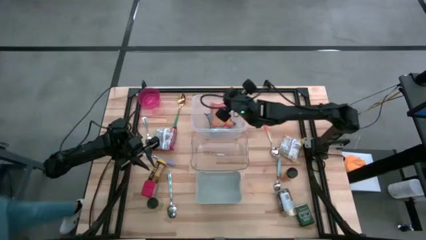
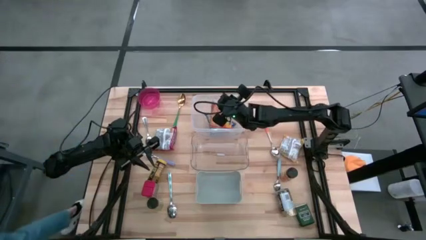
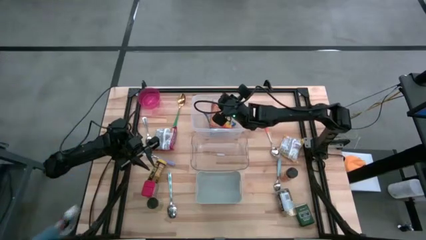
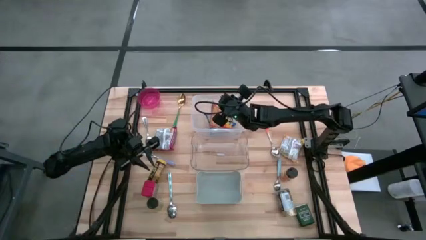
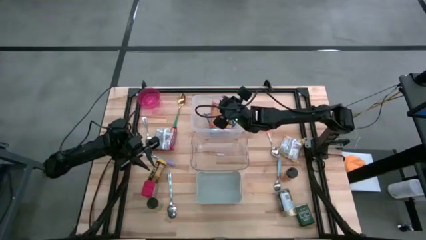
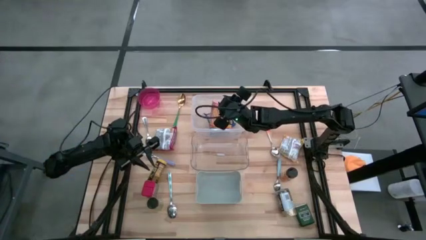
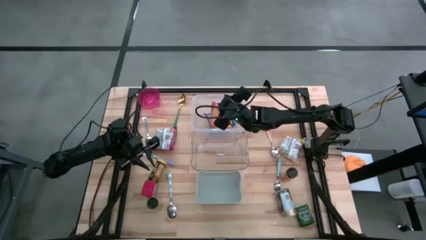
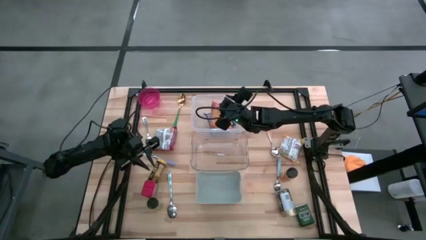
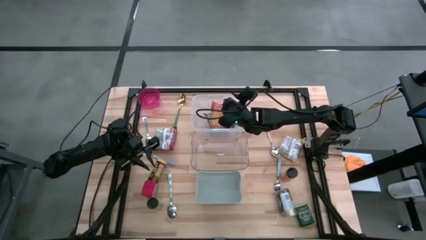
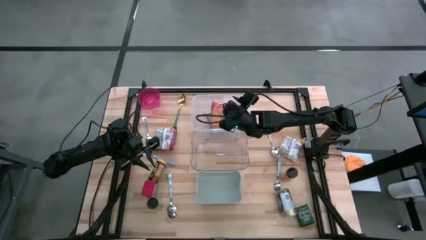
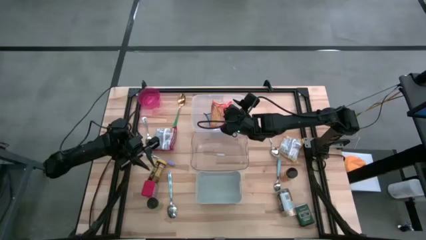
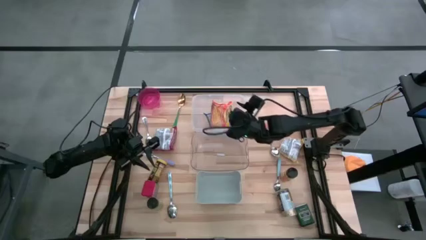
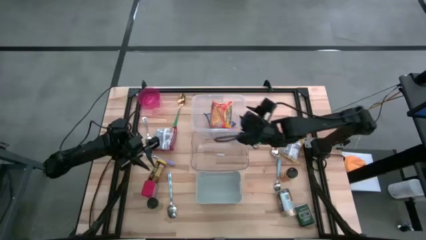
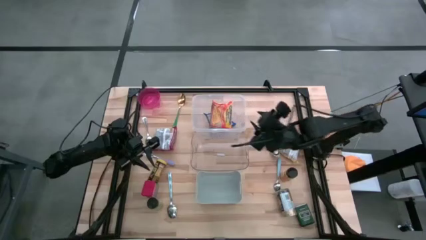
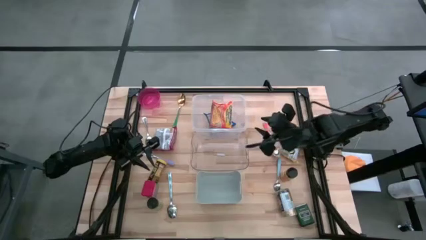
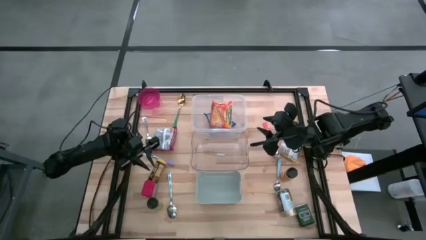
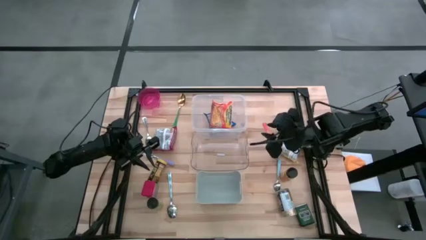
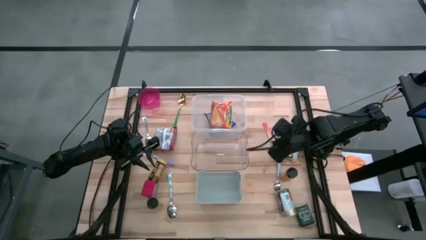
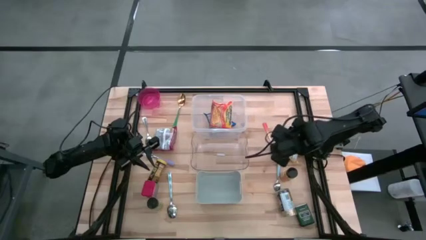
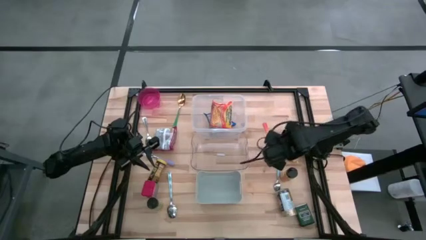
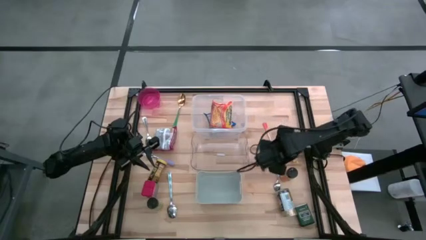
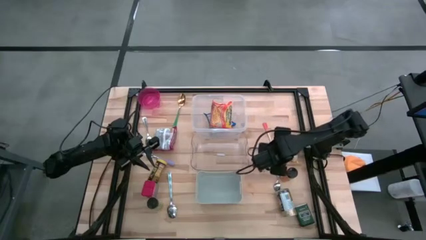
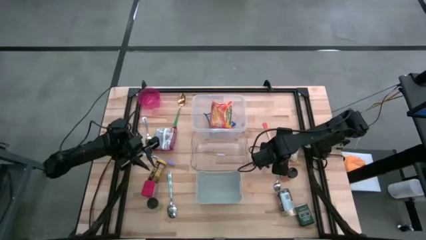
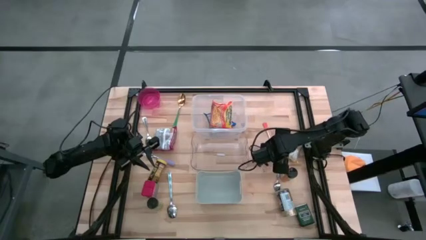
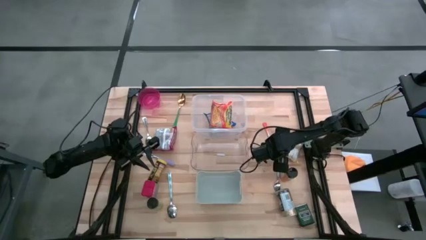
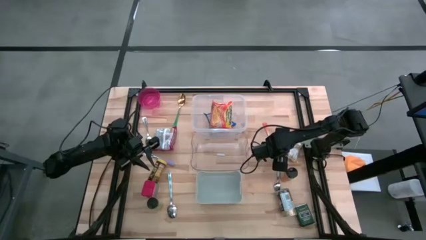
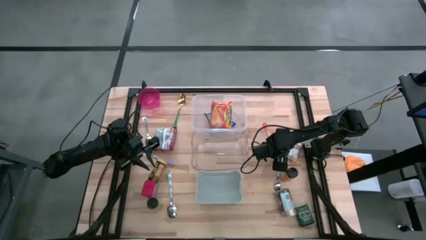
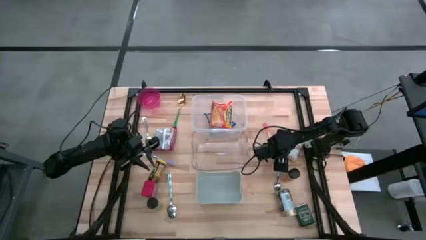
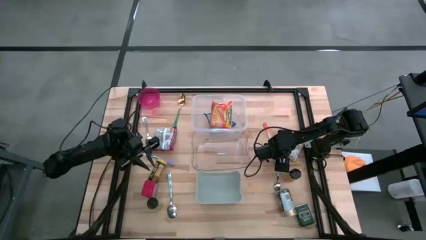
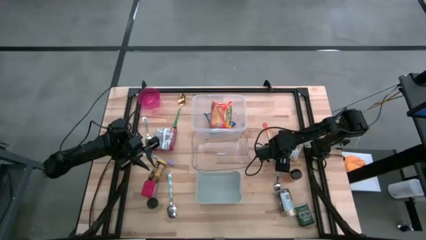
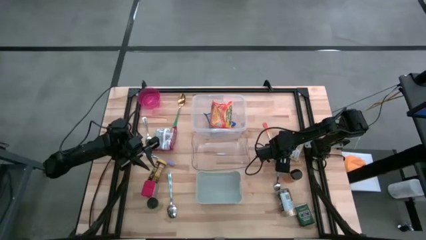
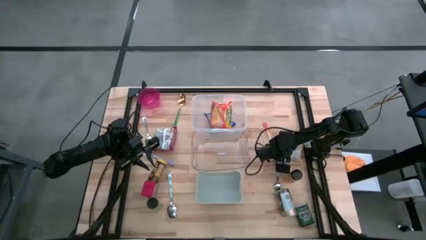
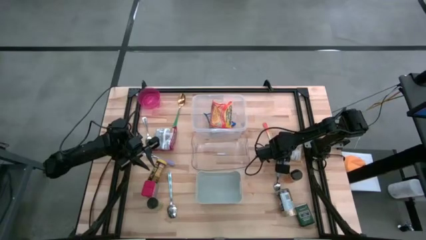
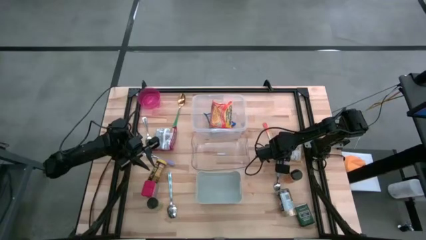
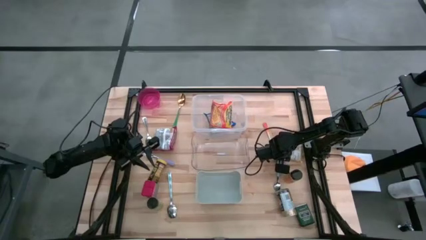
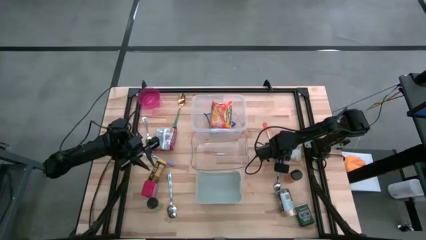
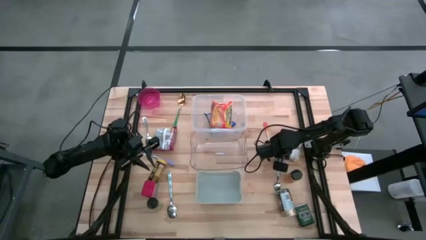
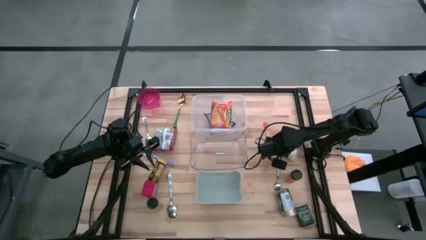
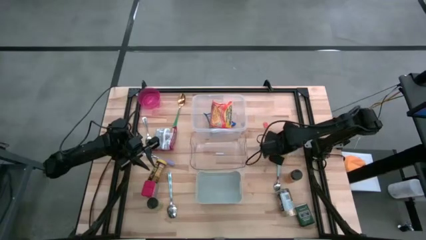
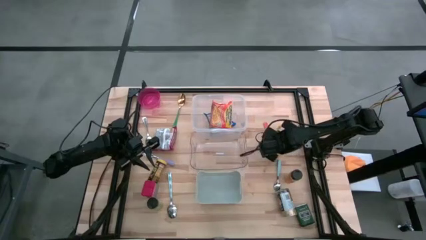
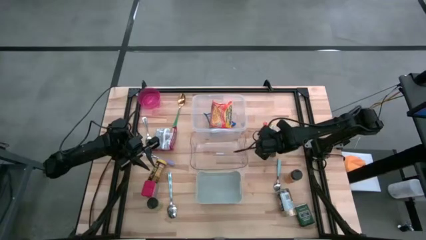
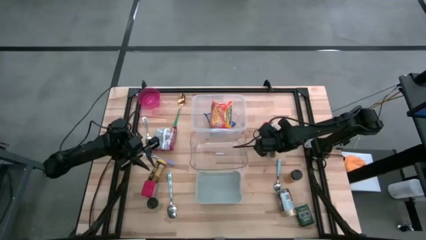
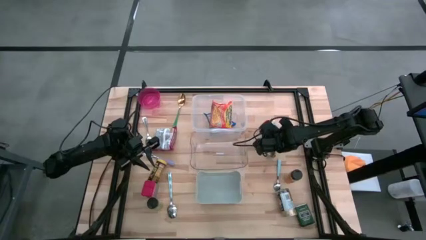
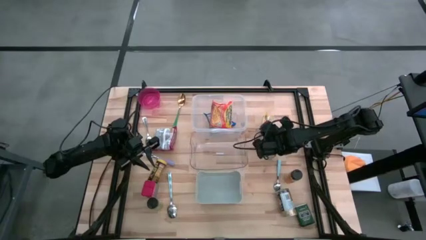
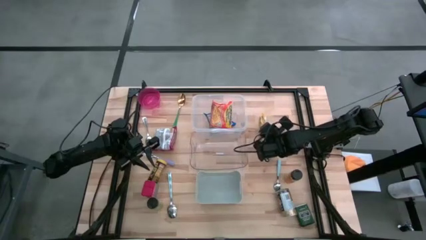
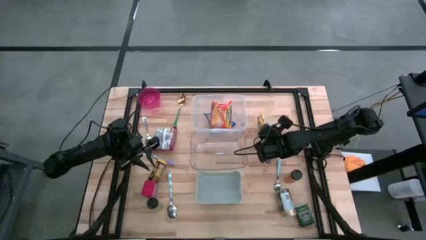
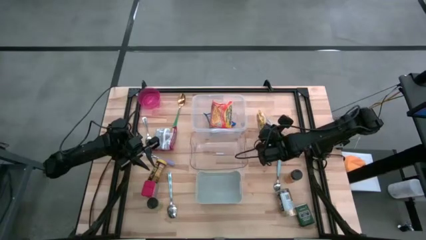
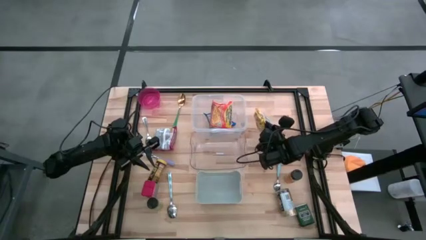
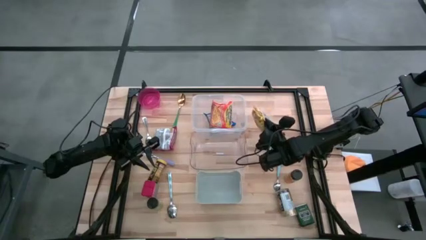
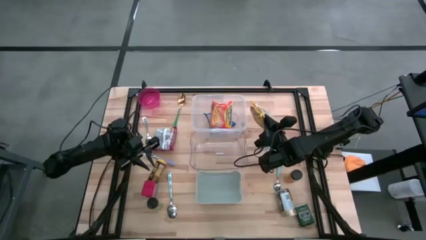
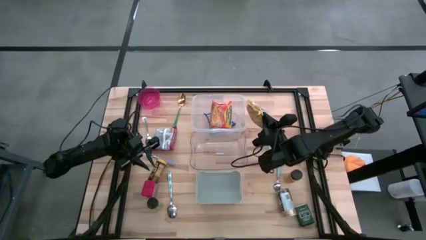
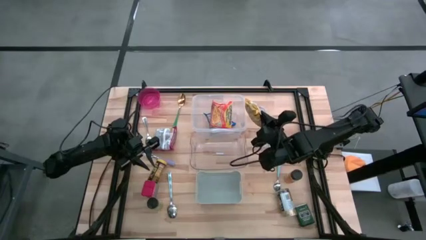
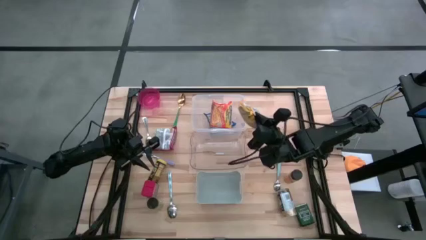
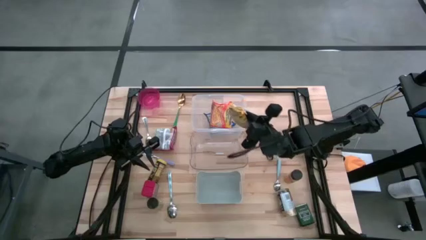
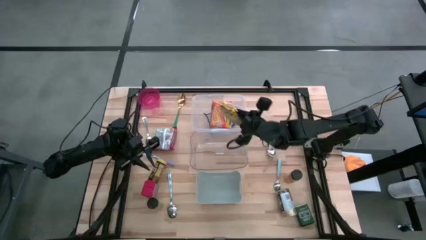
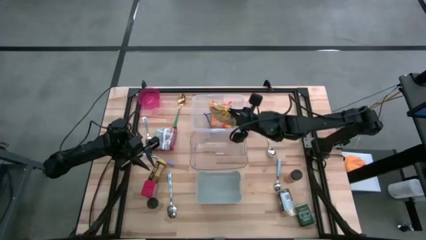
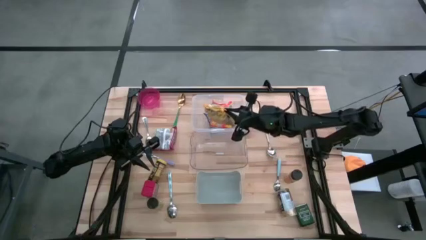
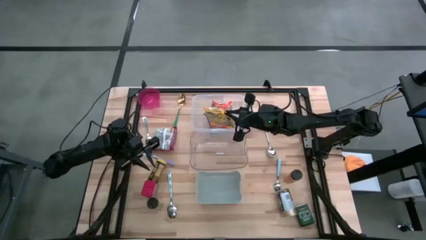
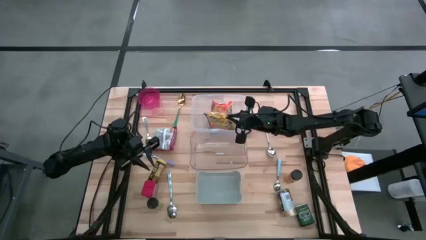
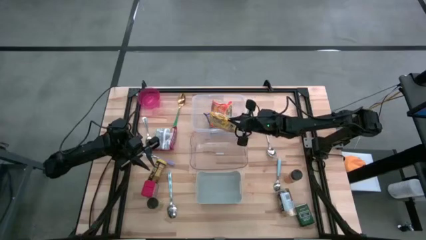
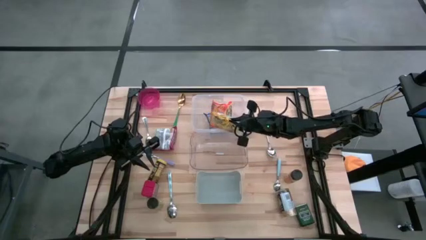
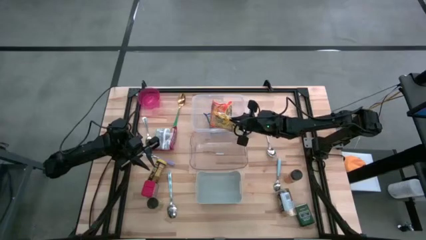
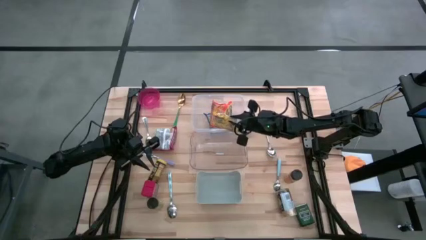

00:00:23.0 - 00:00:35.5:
Put the yellow noodle pack into the white bin
